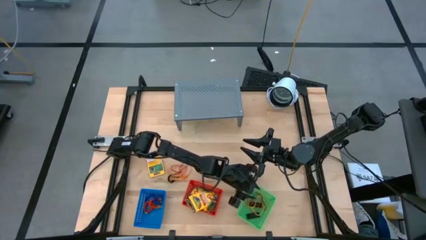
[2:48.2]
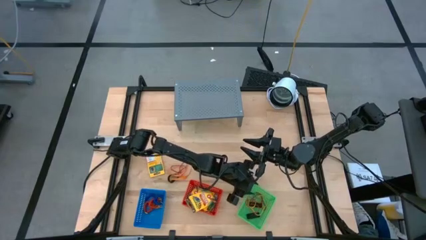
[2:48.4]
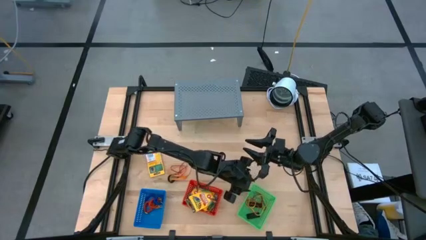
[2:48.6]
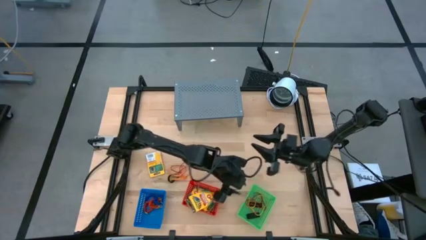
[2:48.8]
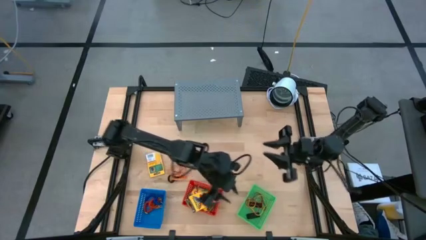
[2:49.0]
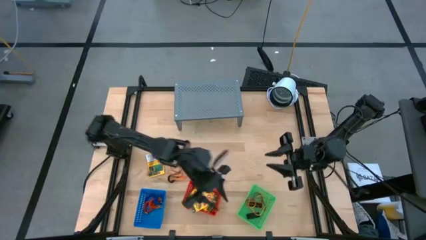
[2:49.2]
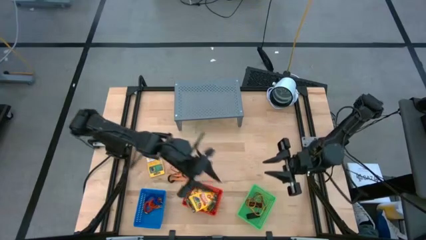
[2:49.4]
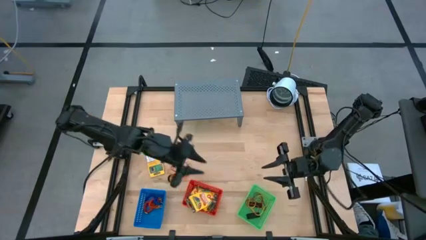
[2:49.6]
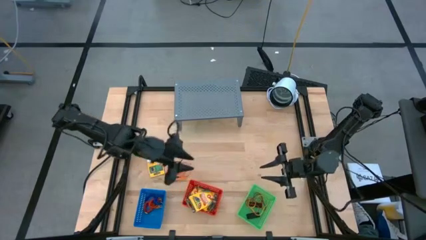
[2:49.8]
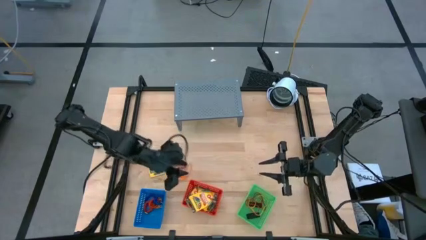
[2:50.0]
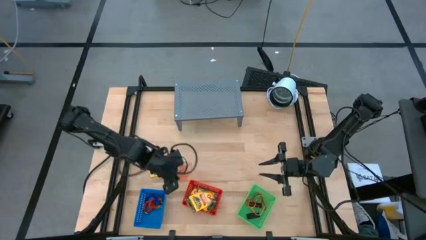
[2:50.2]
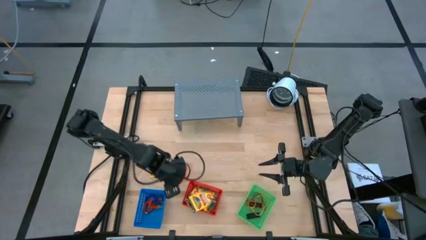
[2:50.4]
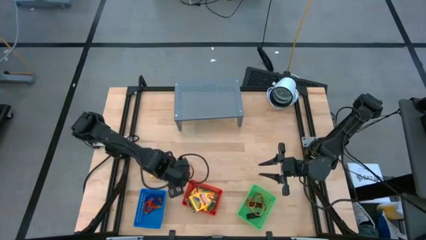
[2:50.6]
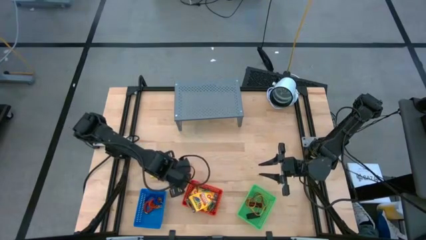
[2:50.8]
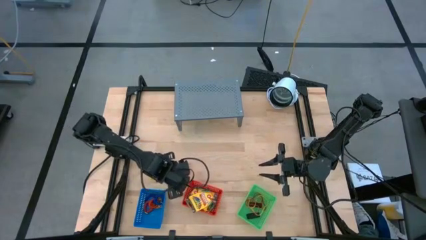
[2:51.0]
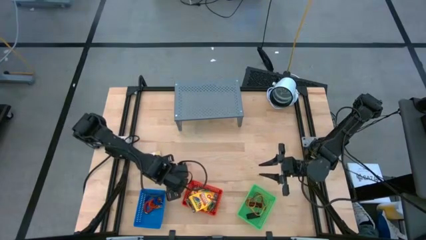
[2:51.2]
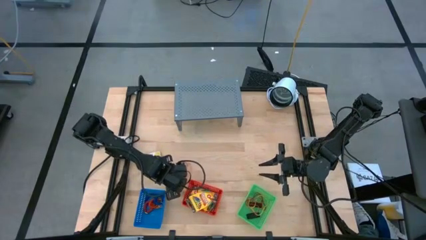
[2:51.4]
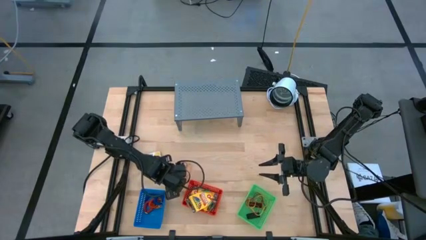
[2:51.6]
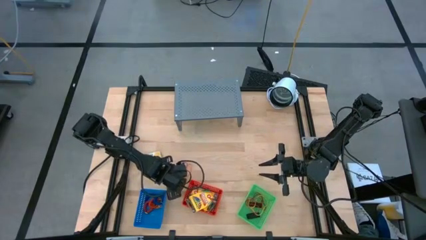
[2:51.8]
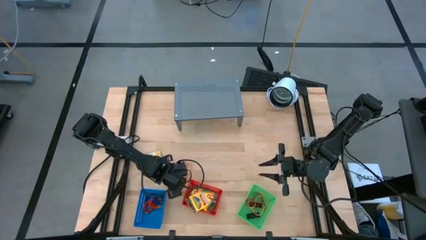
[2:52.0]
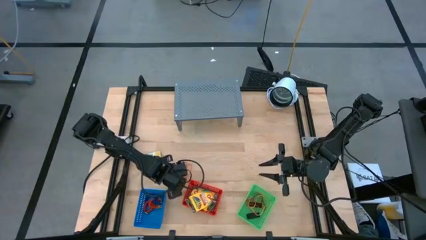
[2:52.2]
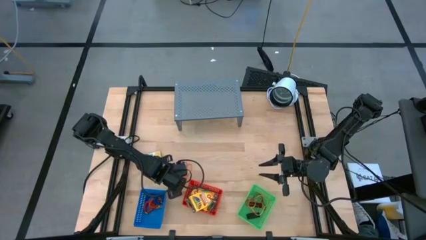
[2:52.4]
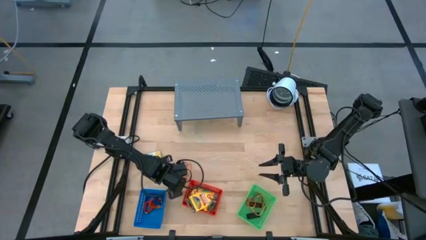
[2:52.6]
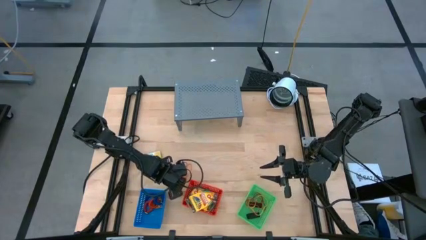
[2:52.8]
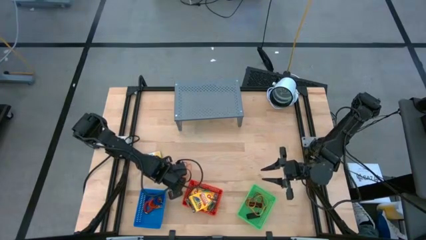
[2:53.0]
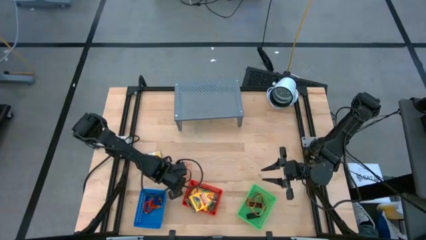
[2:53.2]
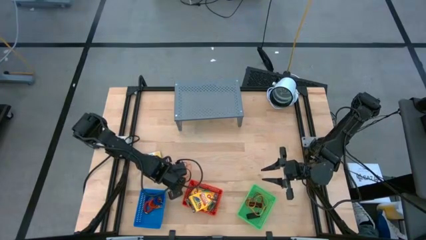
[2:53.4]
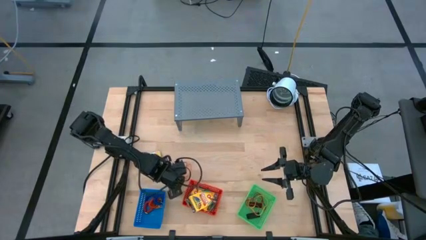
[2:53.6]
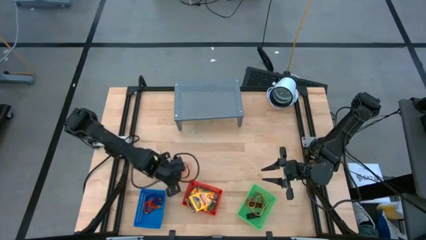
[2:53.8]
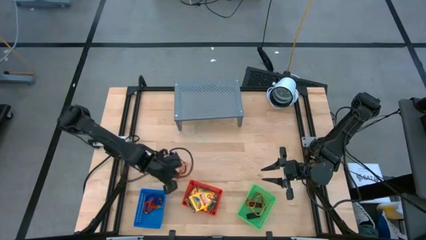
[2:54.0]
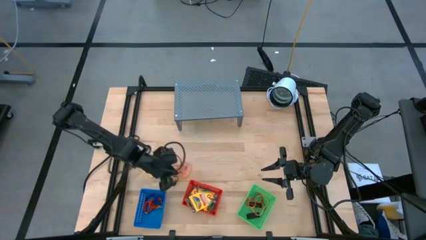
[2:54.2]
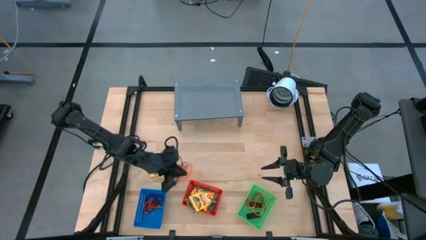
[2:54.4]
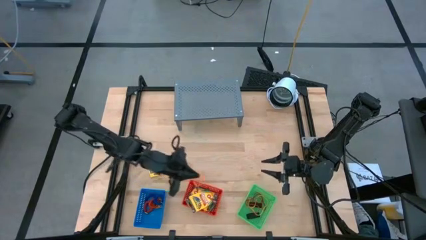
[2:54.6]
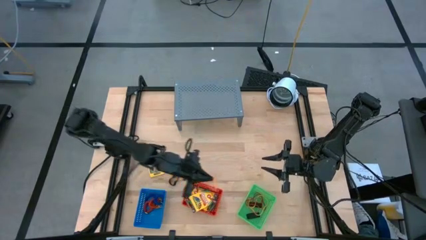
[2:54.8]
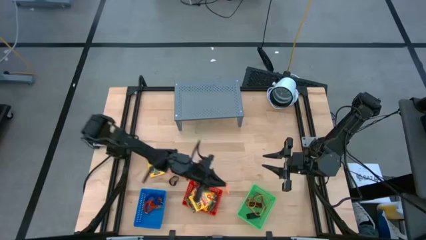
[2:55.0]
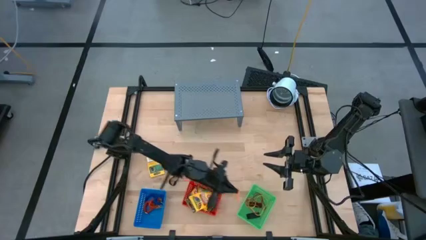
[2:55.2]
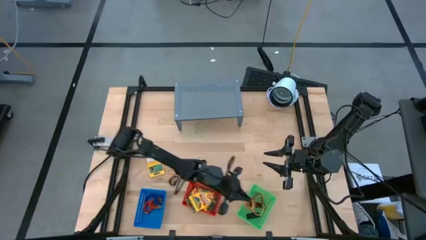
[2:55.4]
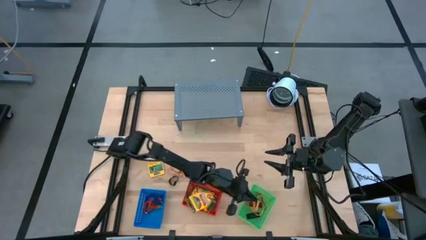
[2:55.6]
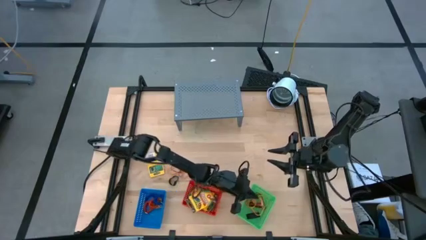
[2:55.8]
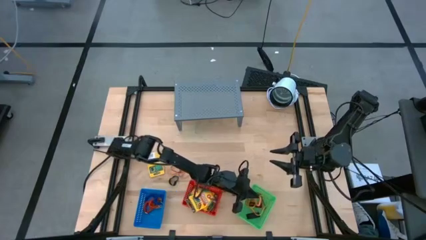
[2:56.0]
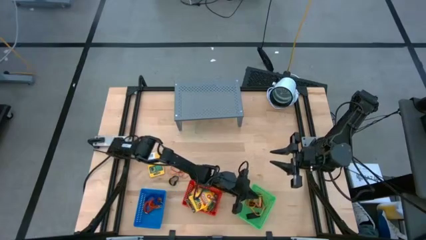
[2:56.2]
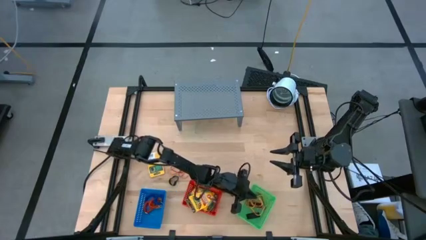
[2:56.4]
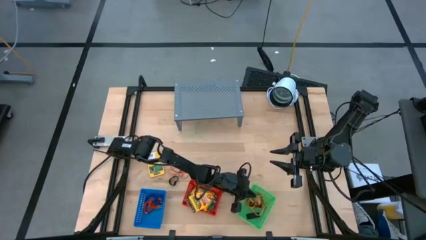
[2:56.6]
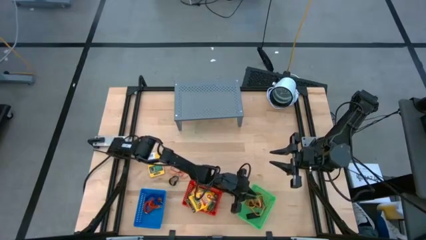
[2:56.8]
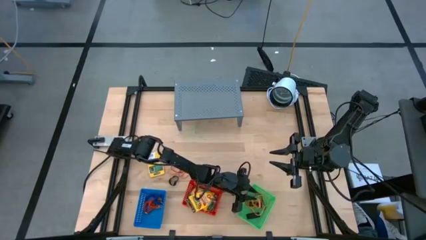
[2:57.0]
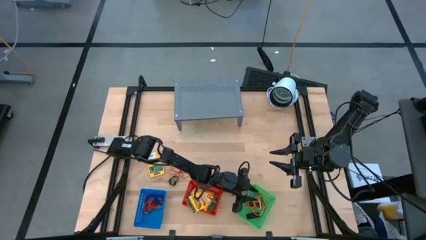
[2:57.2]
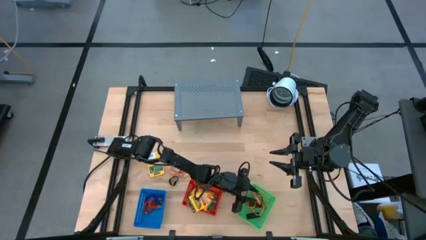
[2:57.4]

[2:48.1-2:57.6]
Task: Pick & Place Office Desk Supplies
Put the bottom orange rubber band into the green basket
